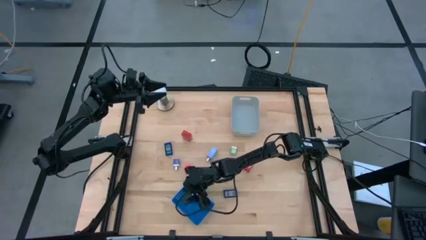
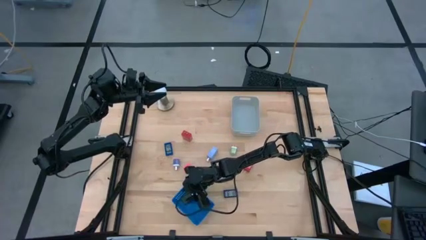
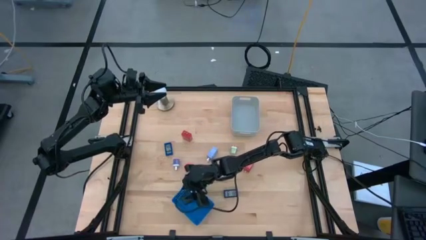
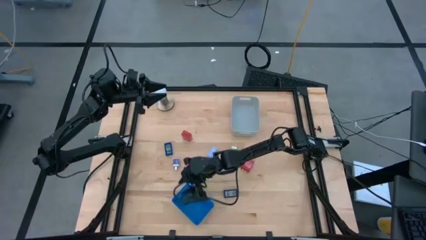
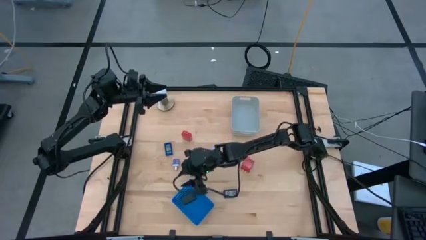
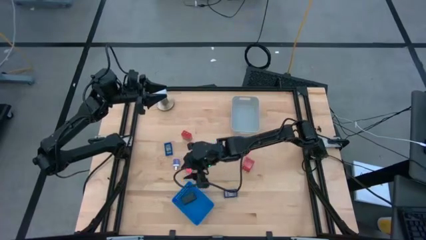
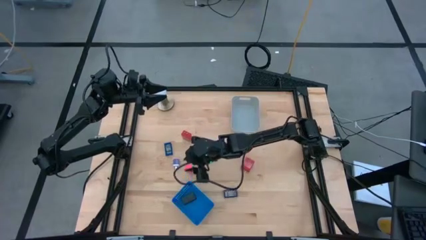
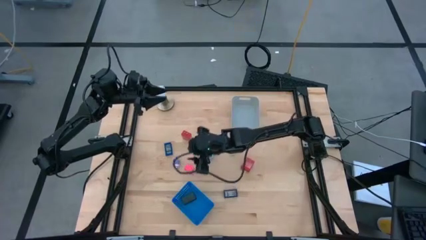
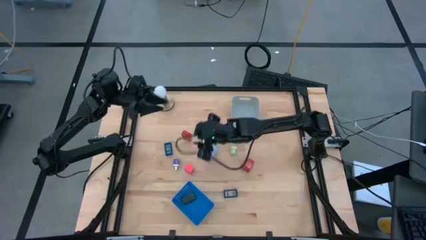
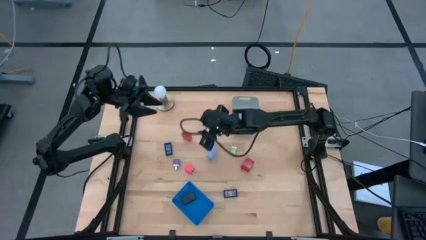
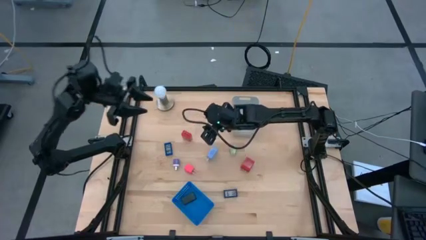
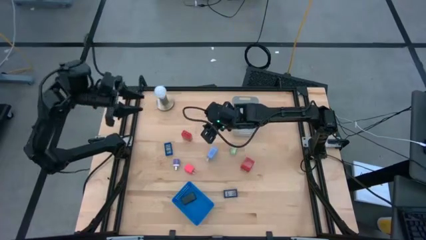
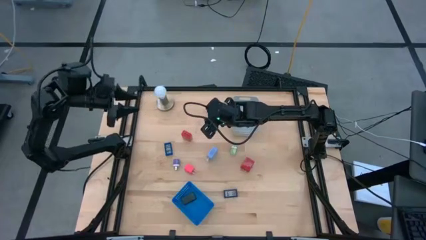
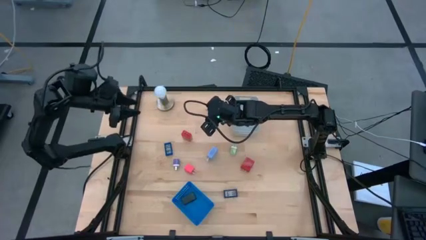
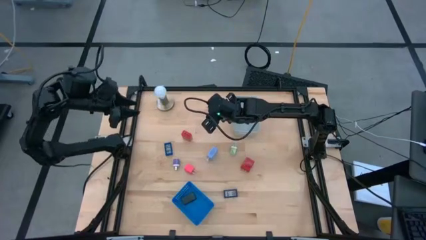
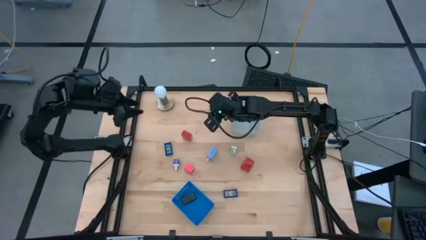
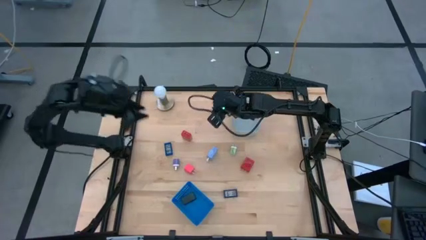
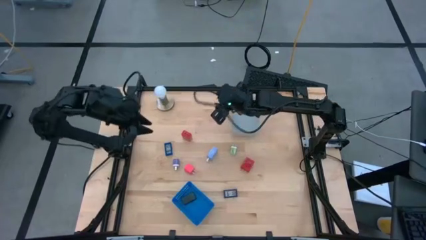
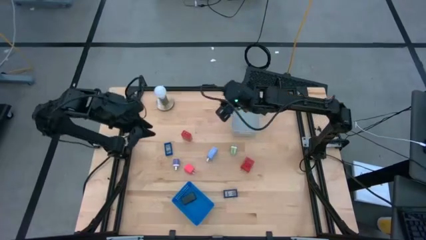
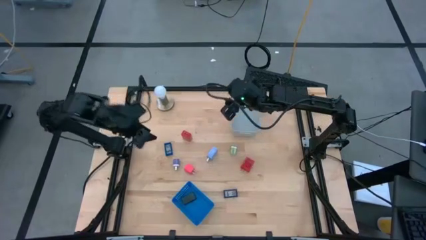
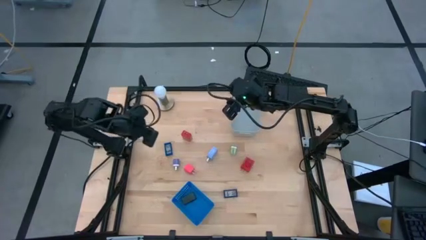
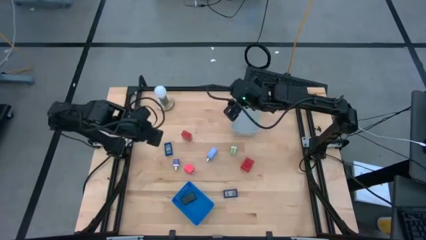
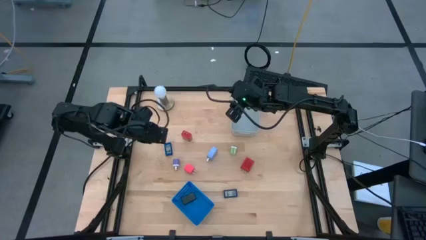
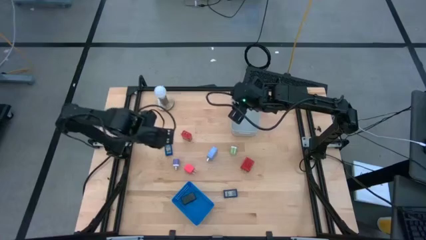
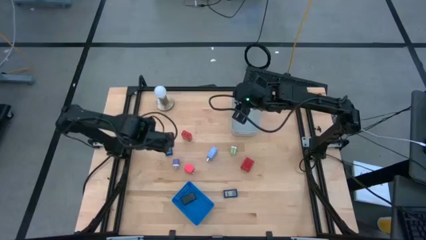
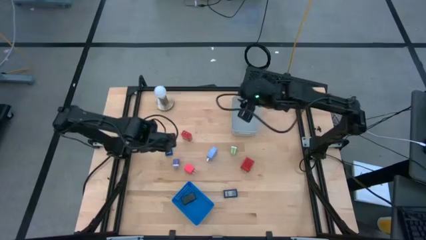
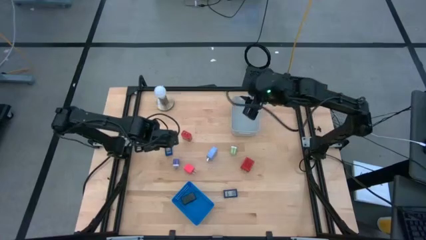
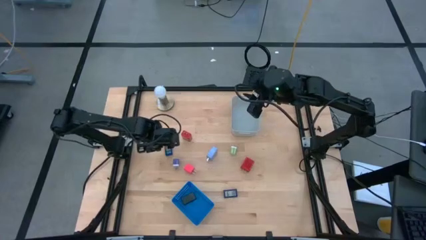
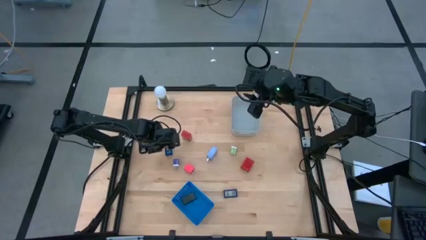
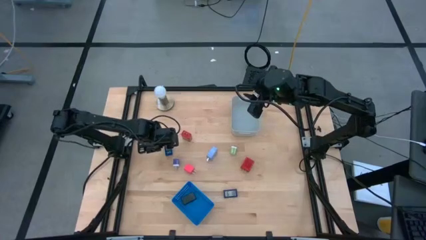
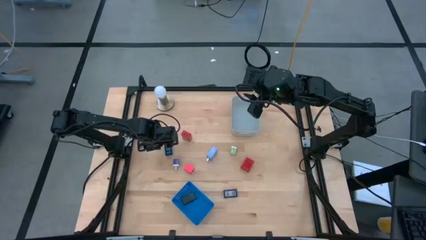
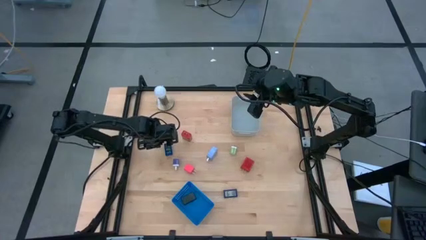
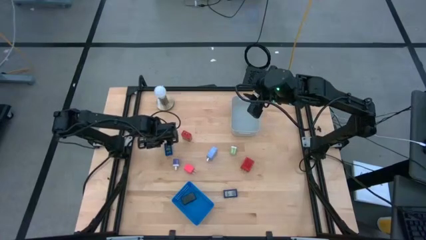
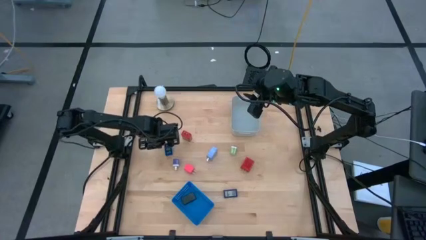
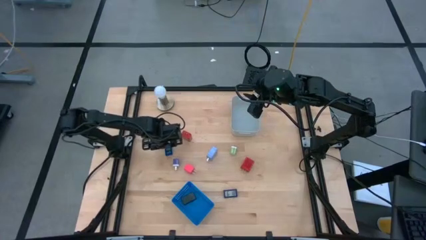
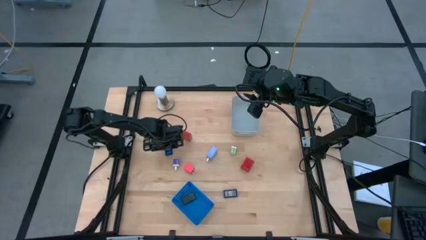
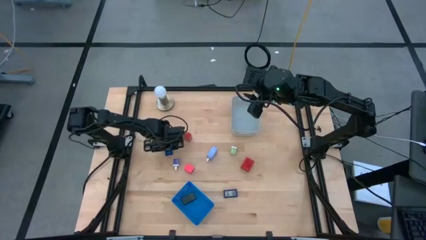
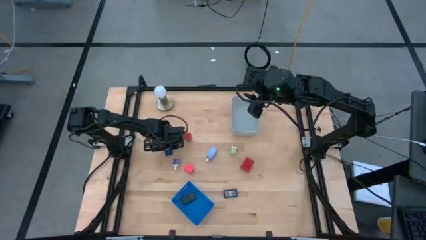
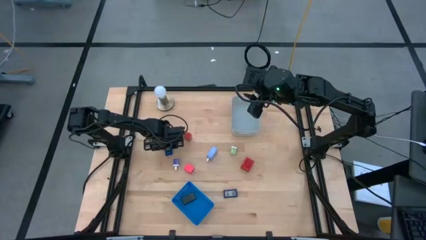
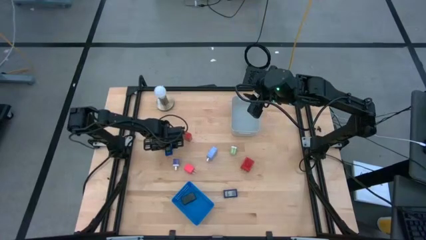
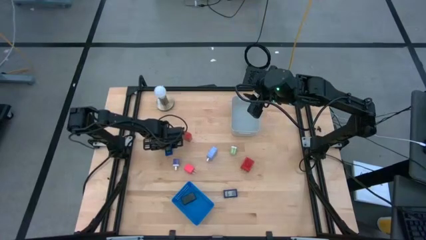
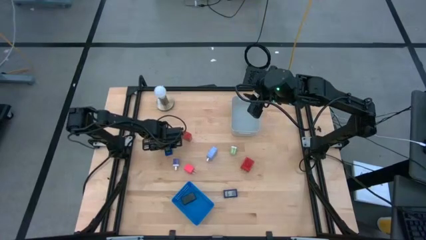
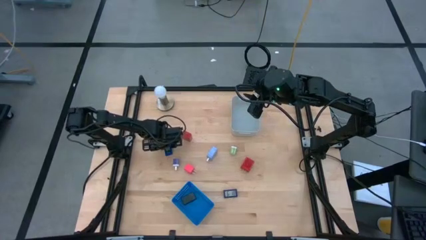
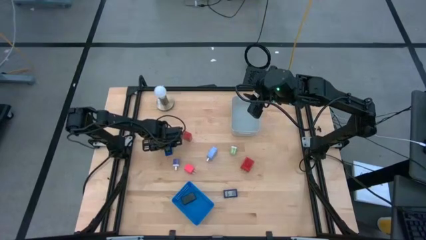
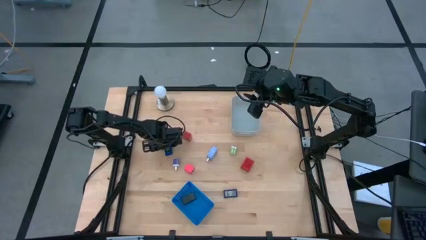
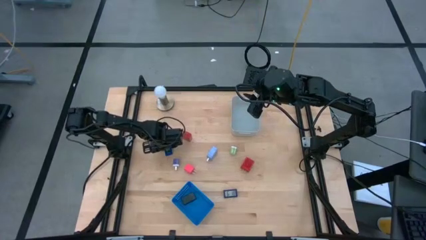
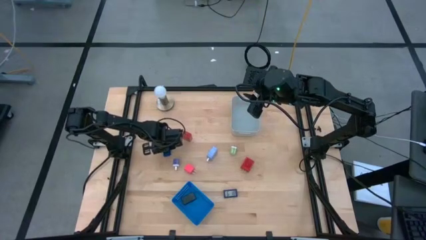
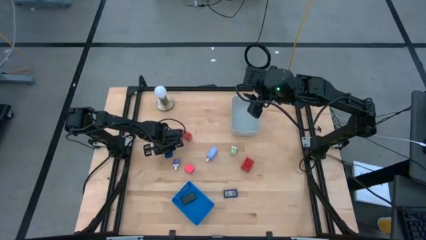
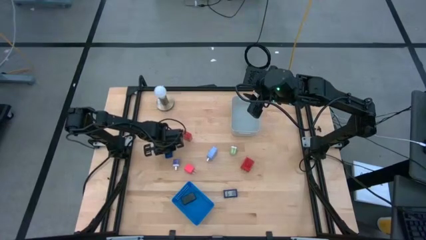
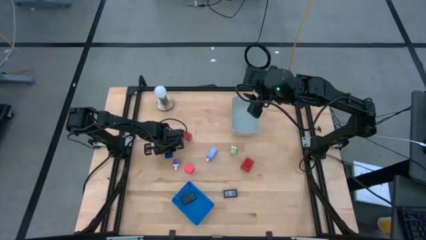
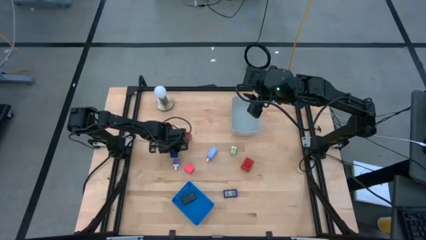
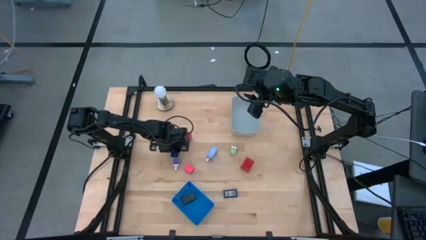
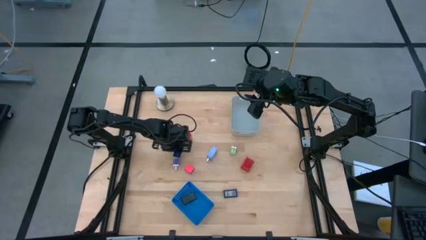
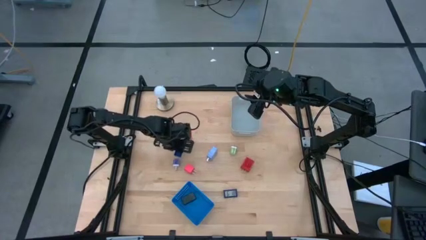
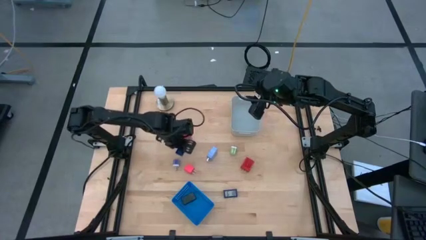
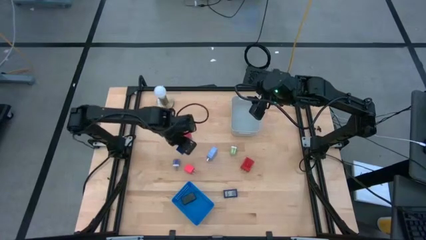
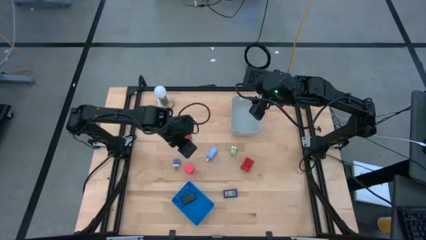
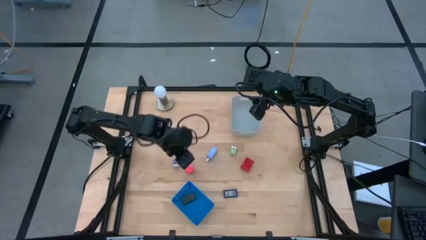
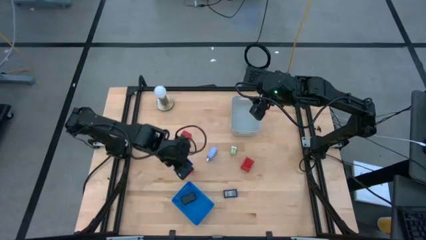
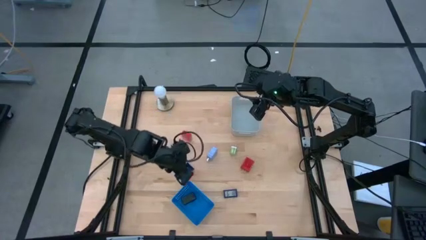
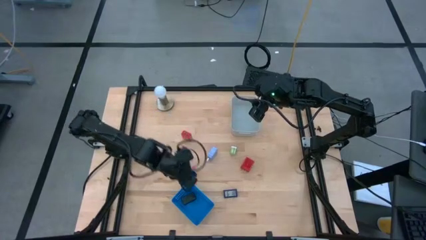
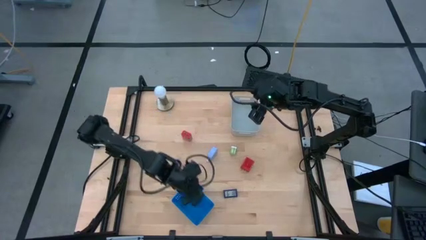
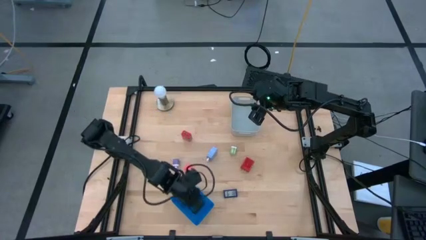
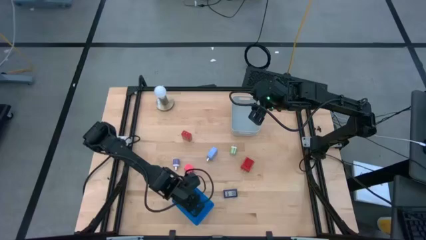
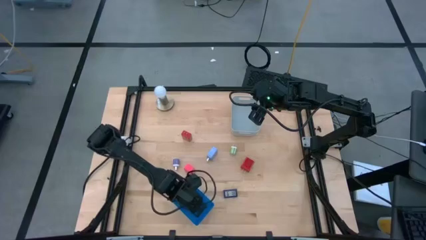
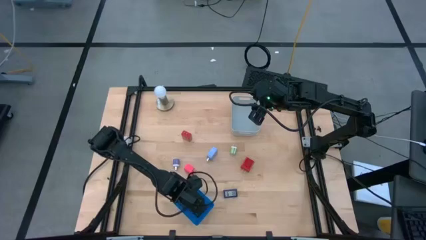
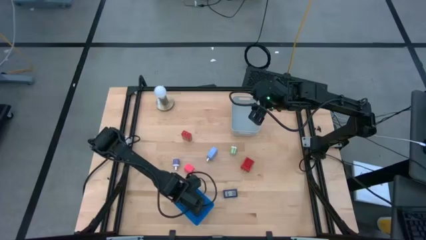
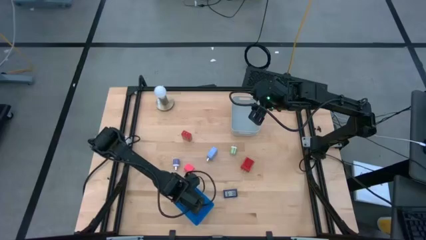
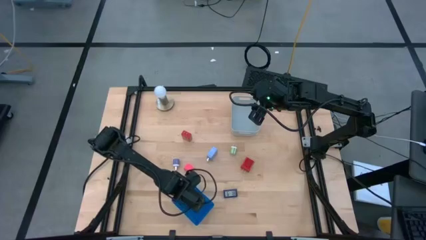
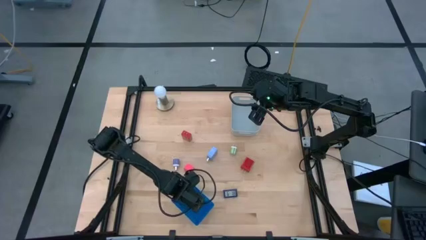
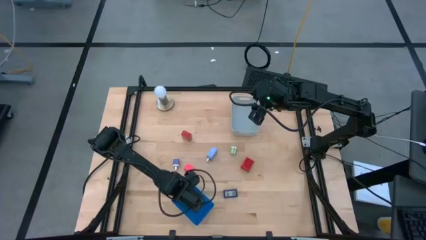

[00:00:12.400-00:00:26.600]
Task: Pick & Place Office items
Put the top blue digital timer into the blue bin

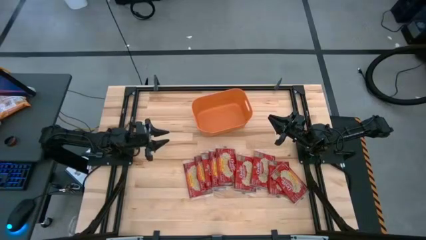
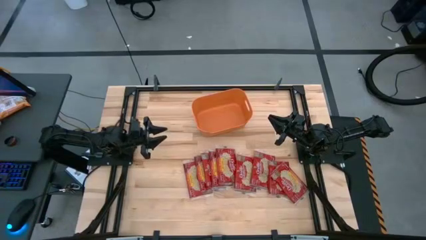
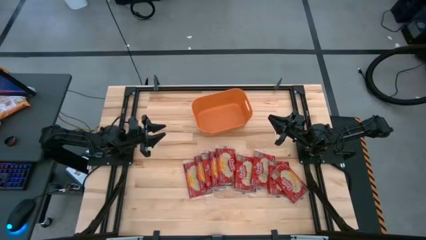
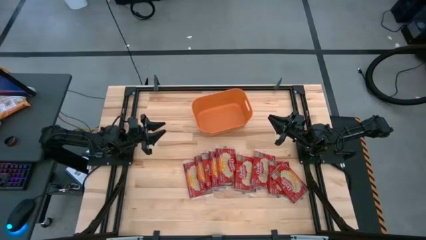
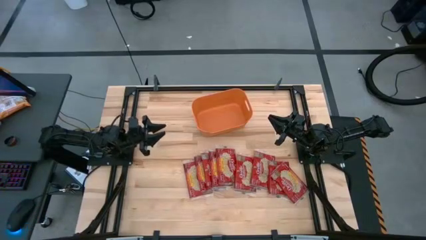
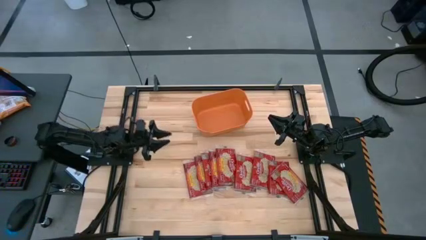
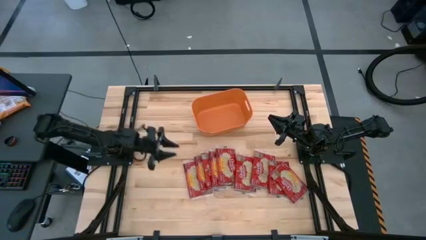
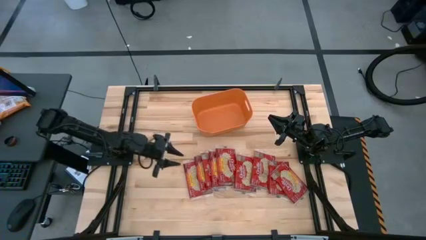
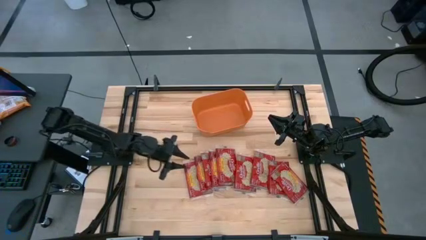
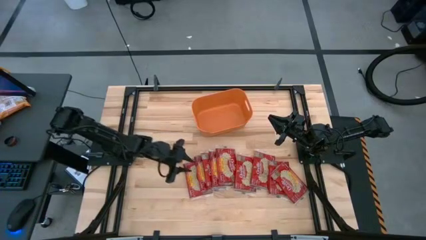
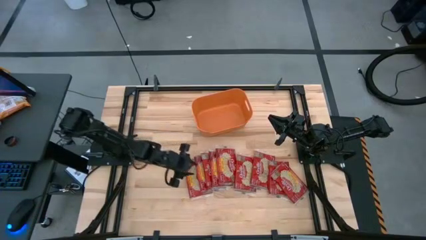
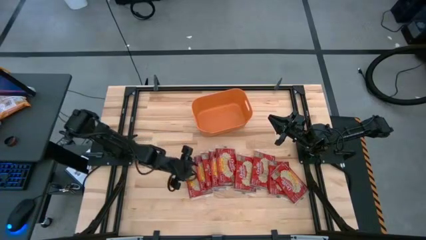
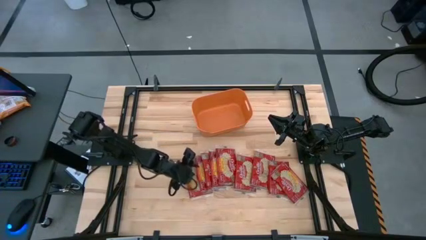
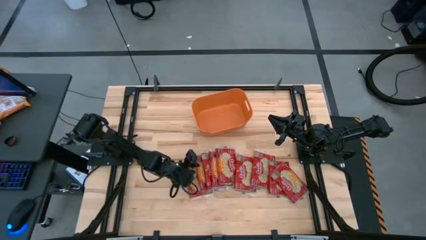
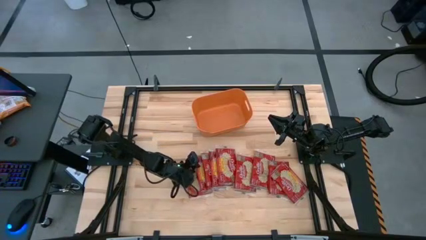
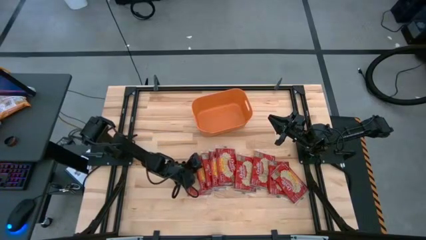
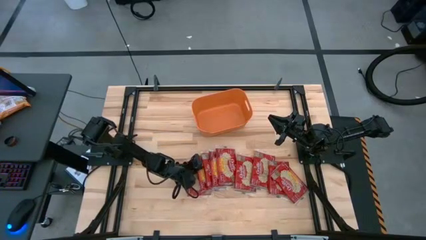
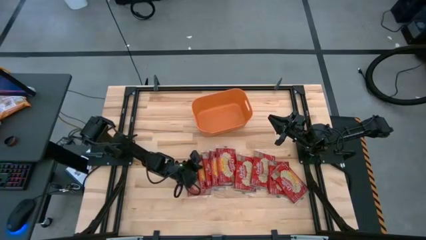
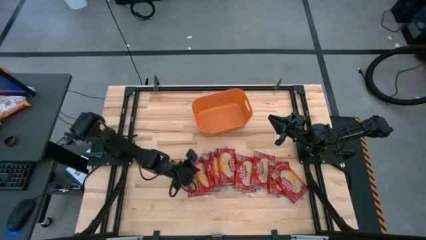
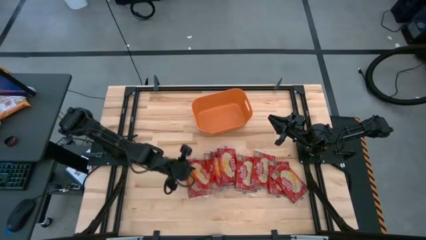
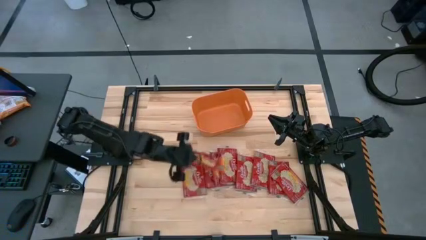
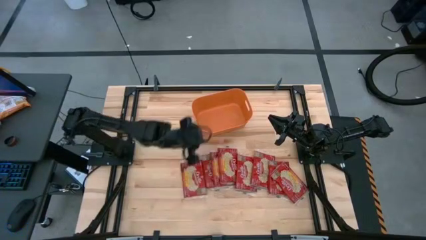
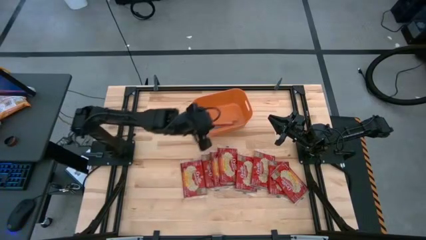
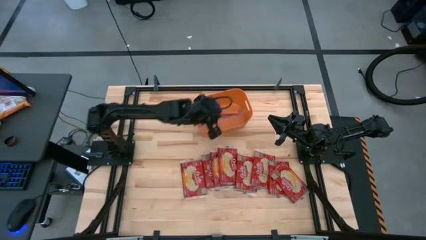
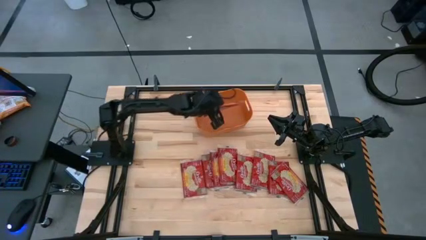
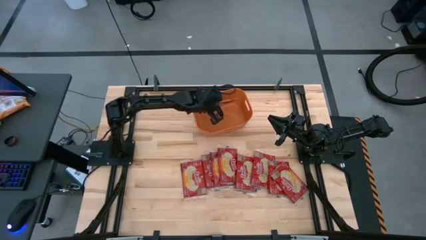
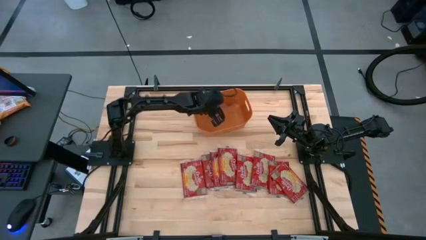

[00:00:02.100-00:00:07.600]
Task: Sort popcorn bags into baskets
Put the red popcorn bag into the orange bin
